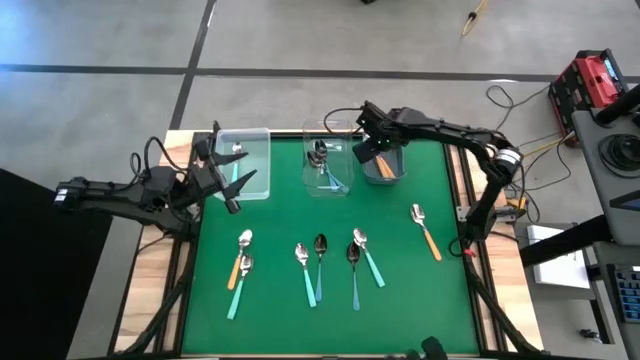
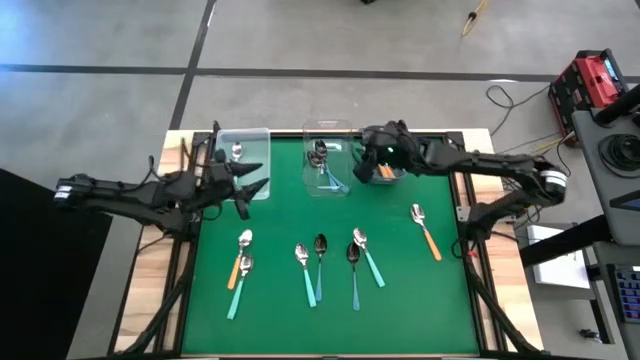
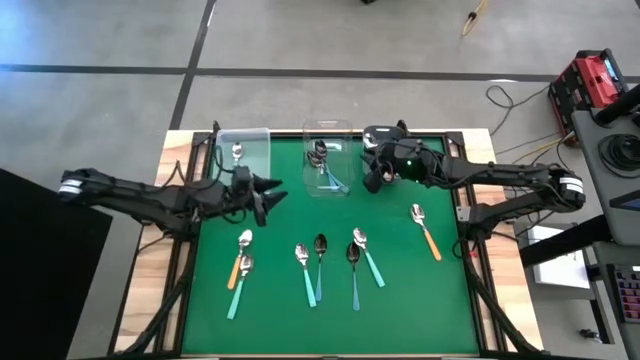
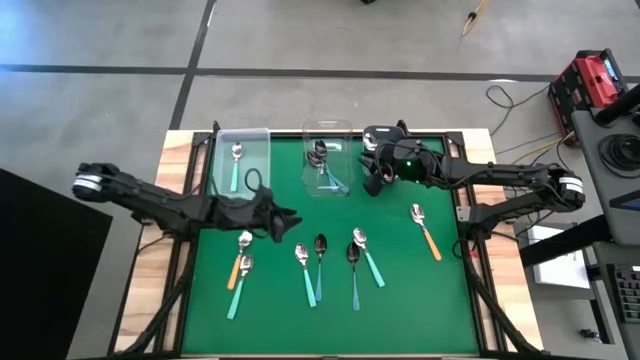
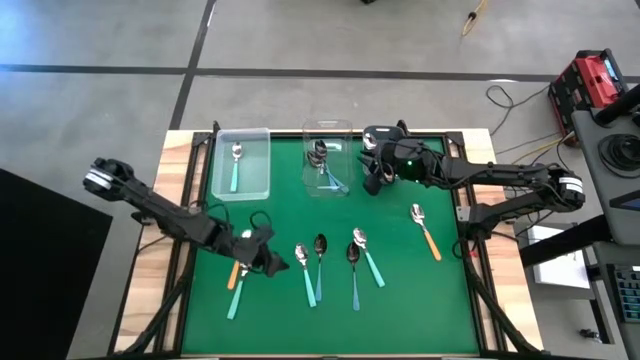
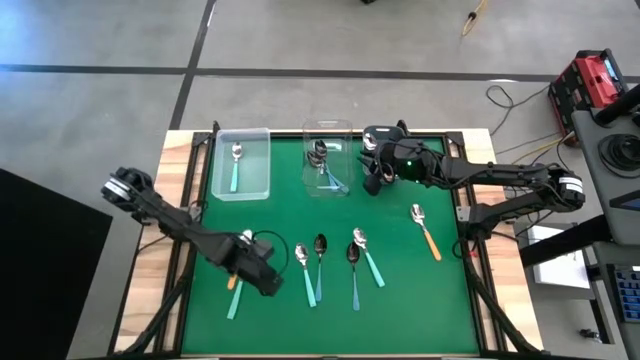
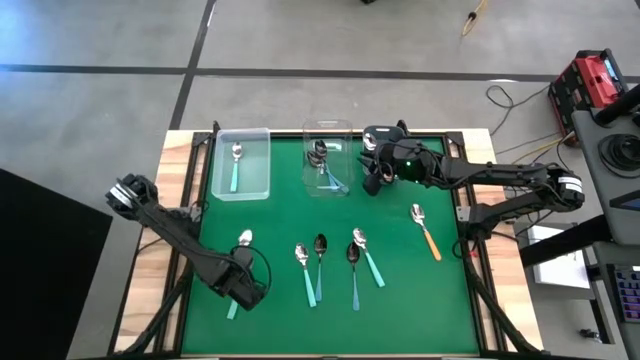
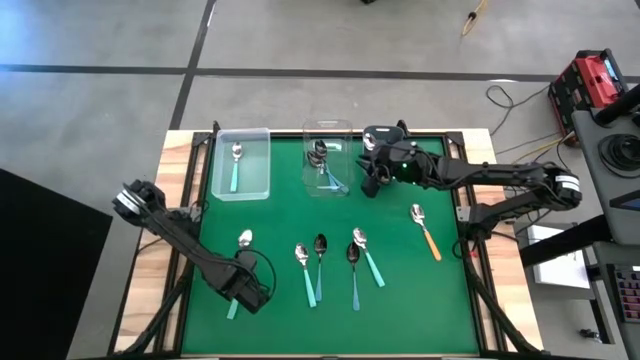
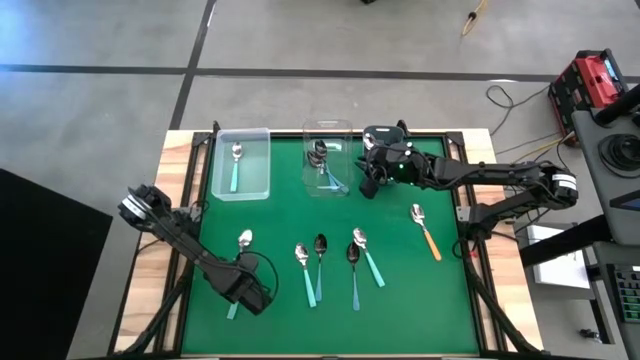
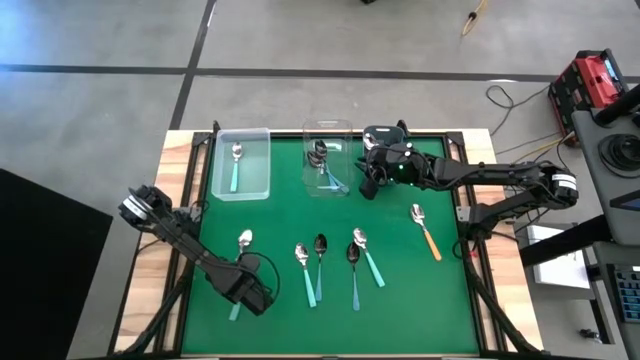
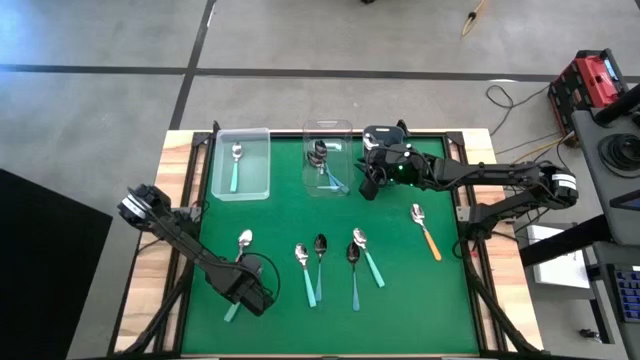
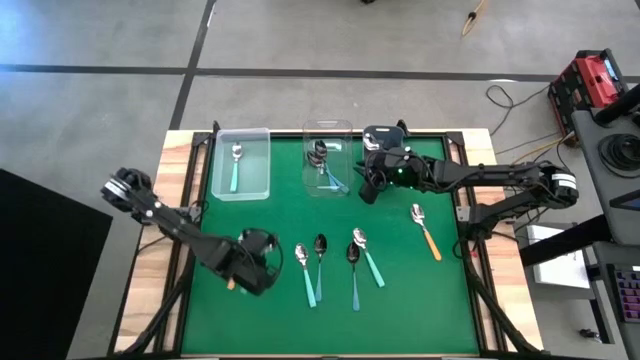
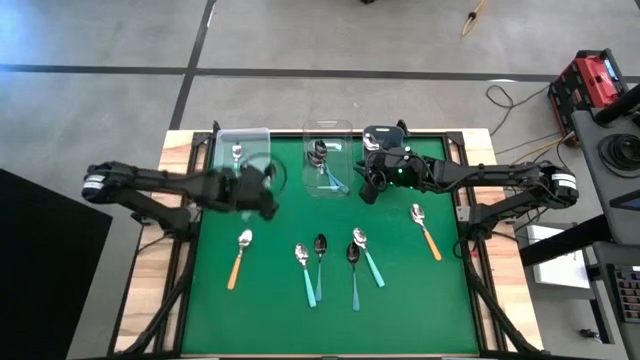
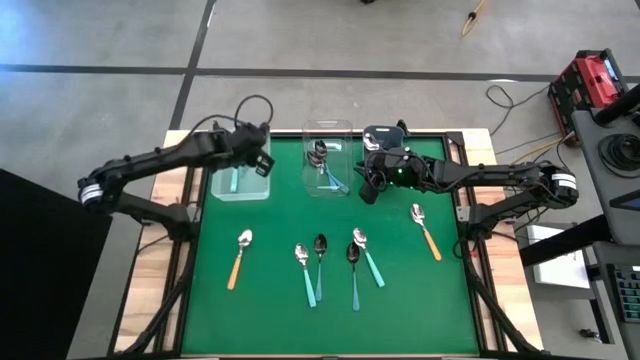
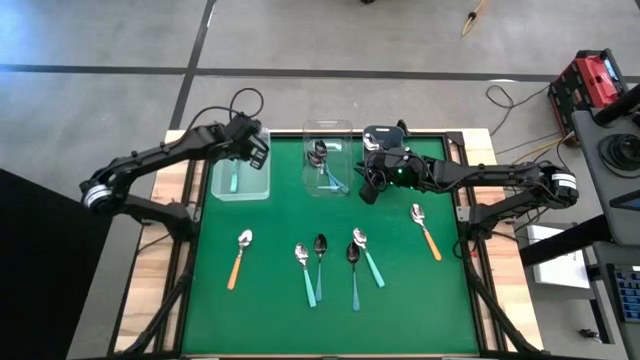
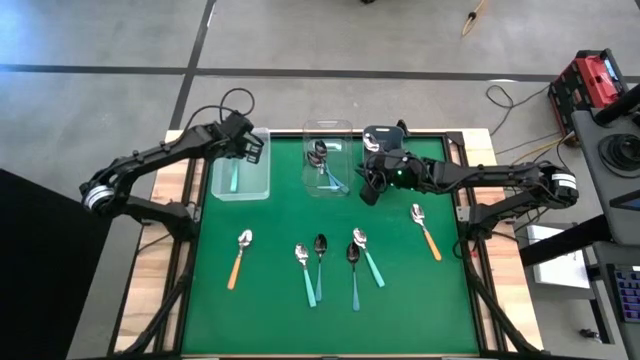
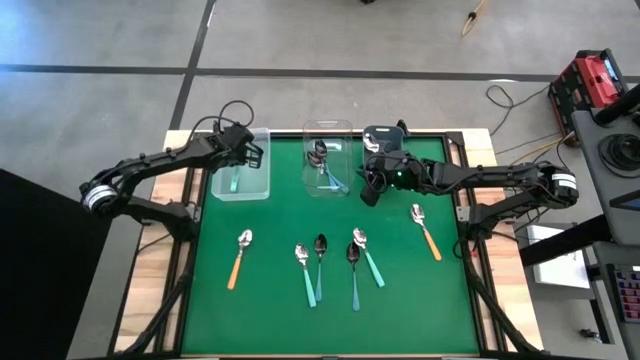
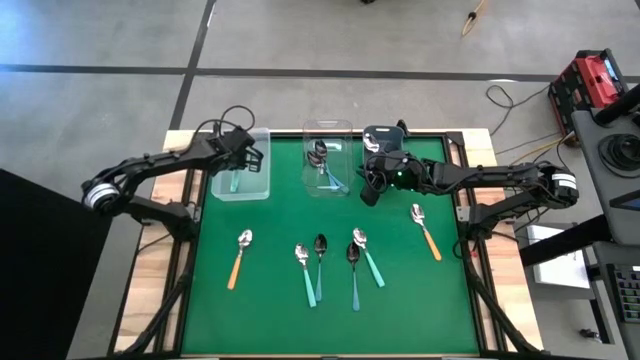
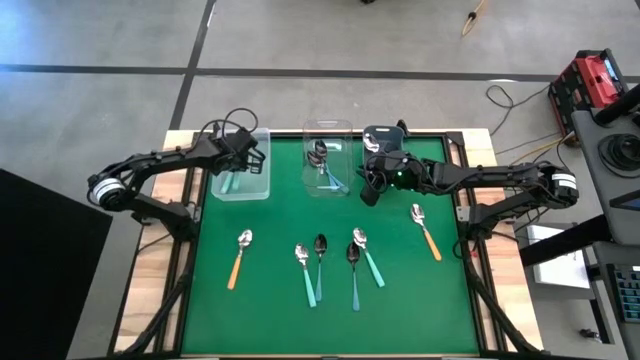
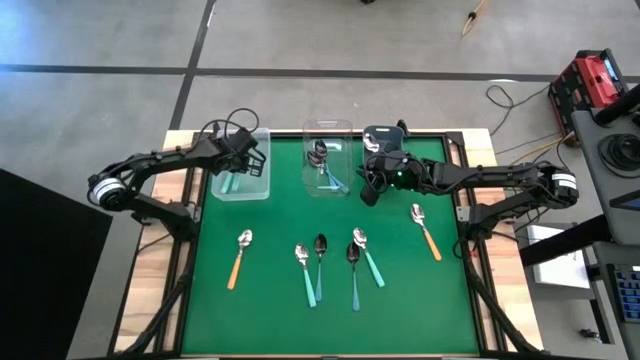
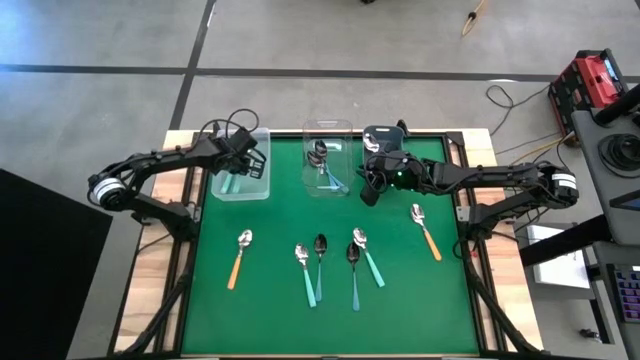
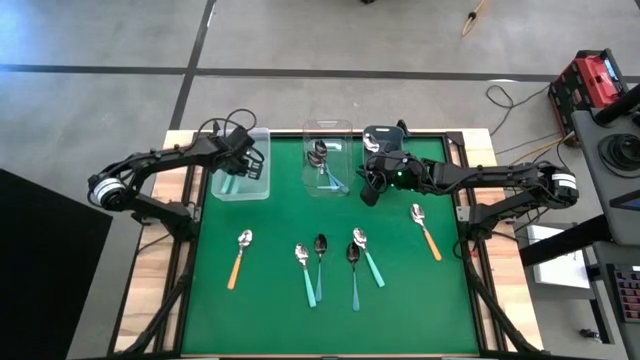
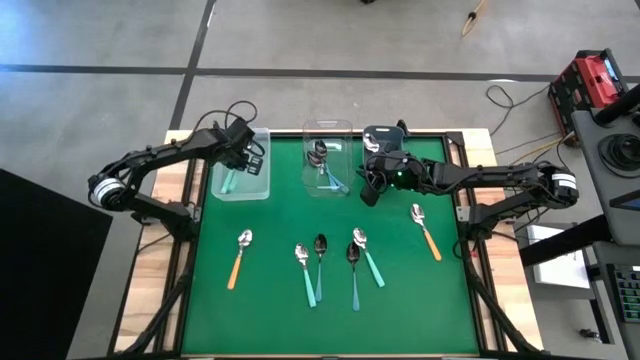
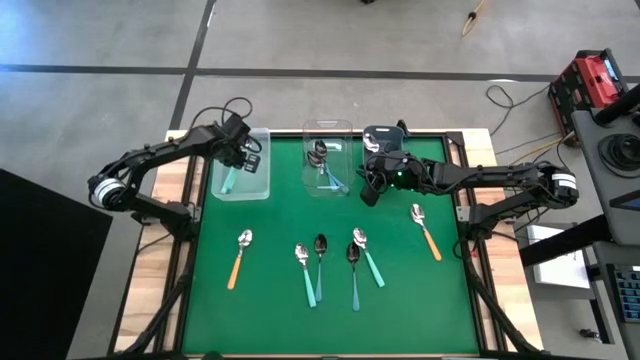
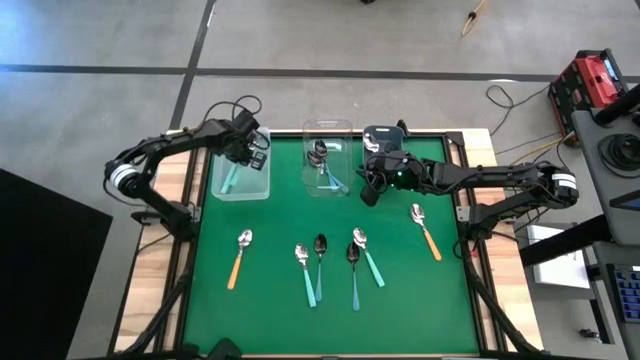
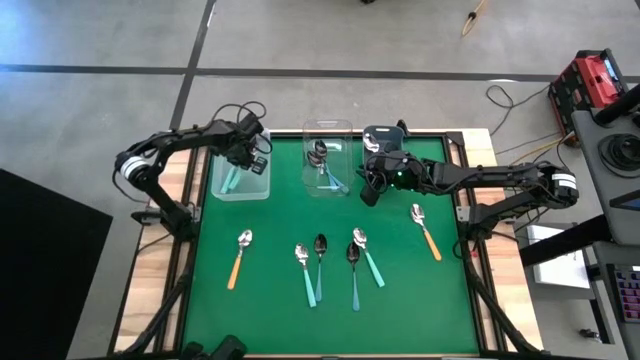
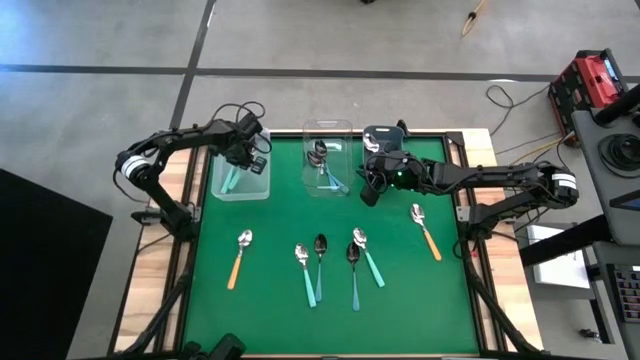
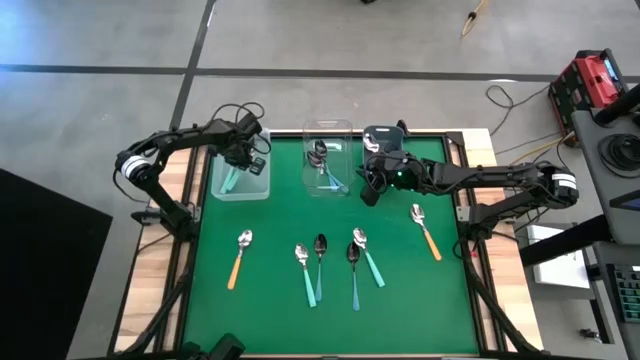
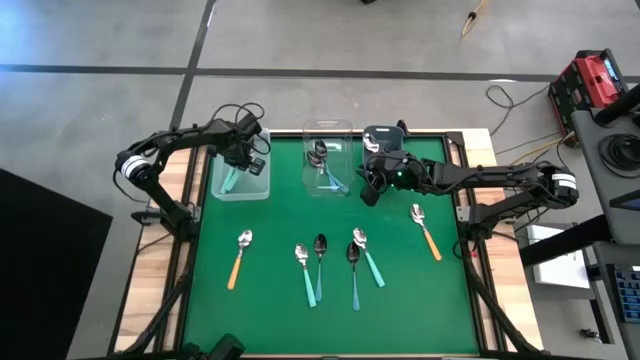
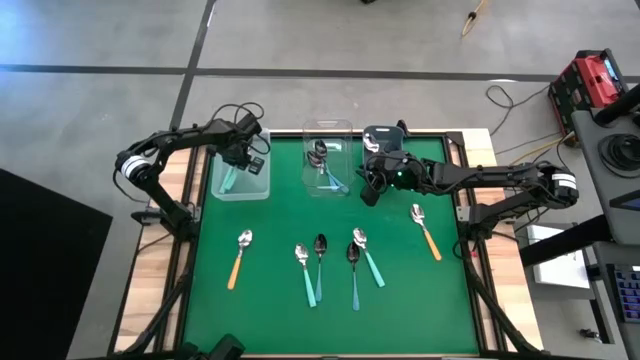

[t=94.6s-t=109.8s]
Task: Sort silverware by color (type)
Put the green spoon into the white bin

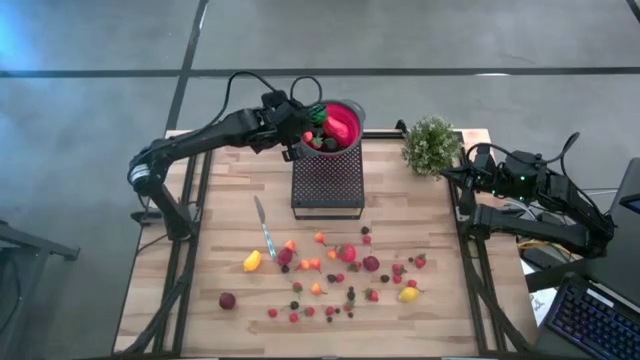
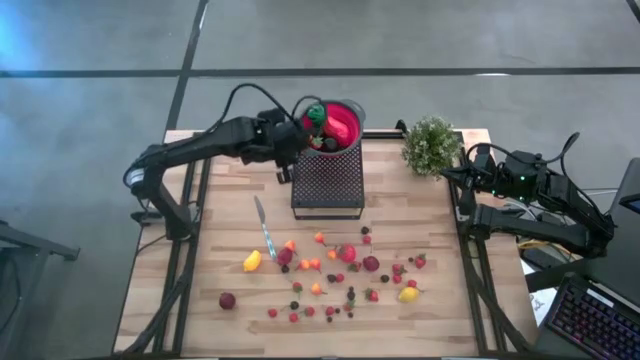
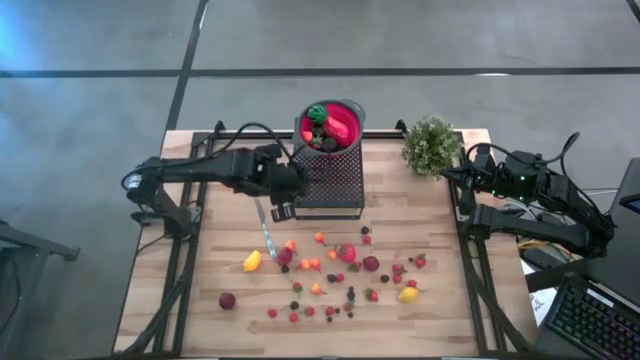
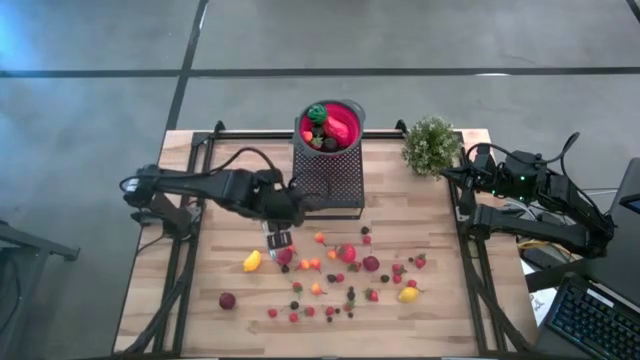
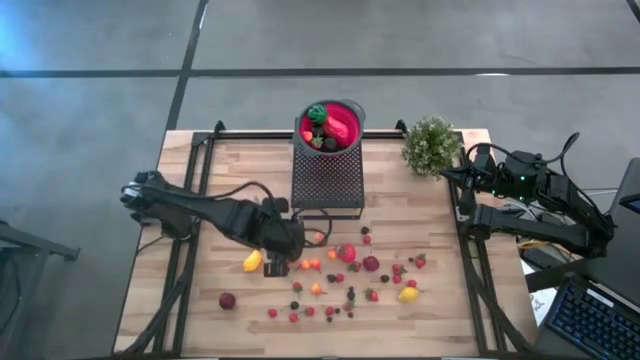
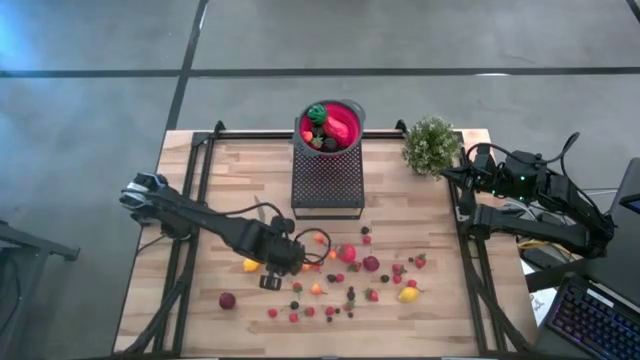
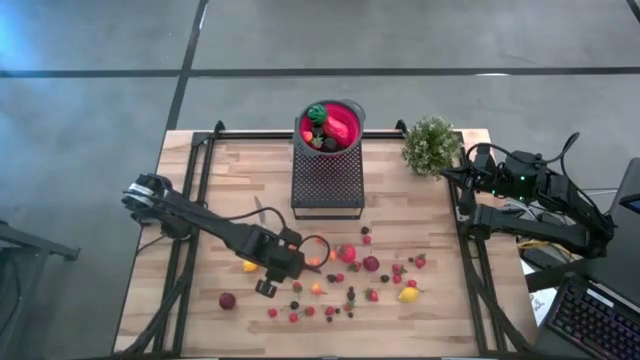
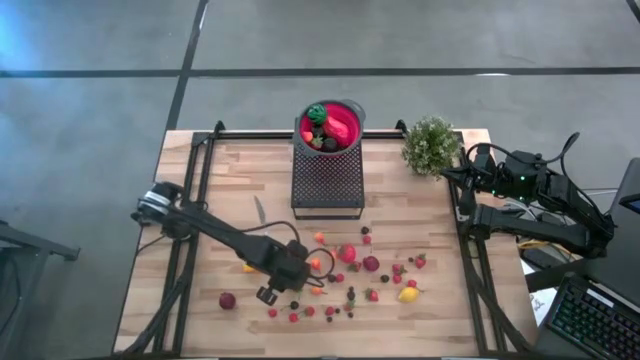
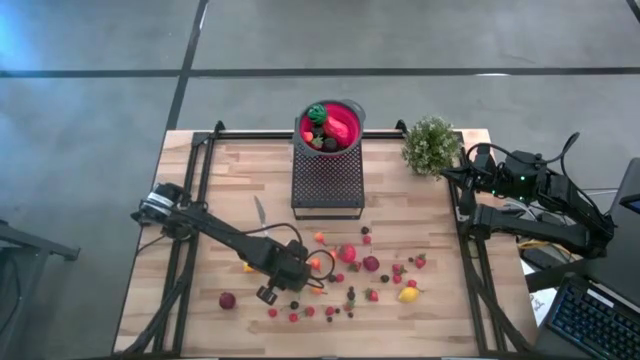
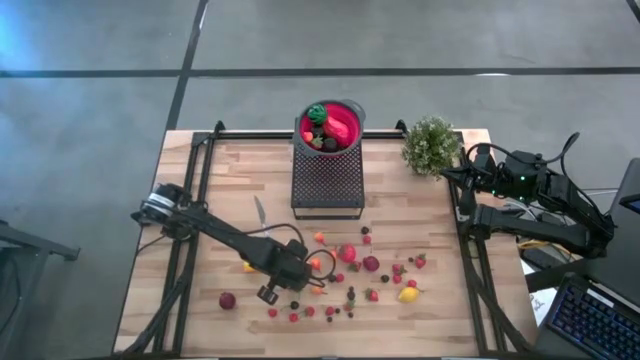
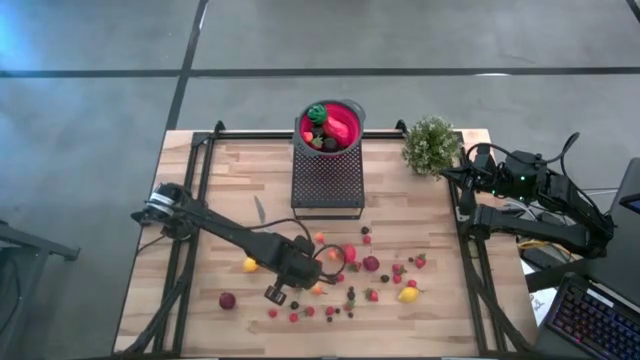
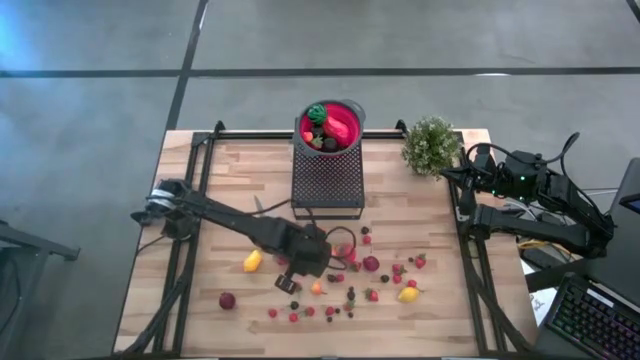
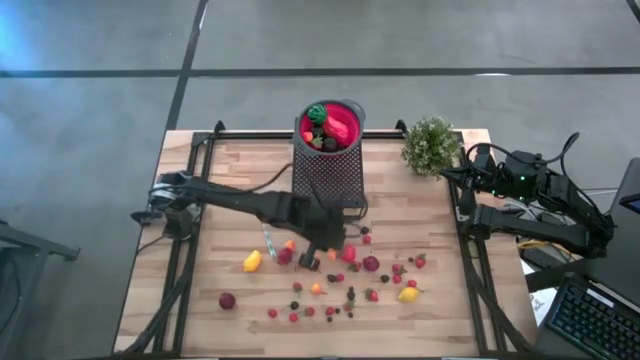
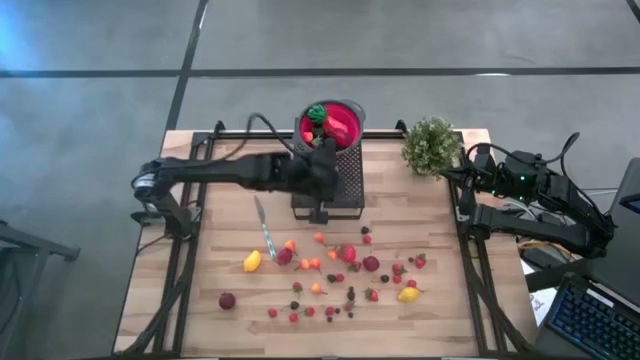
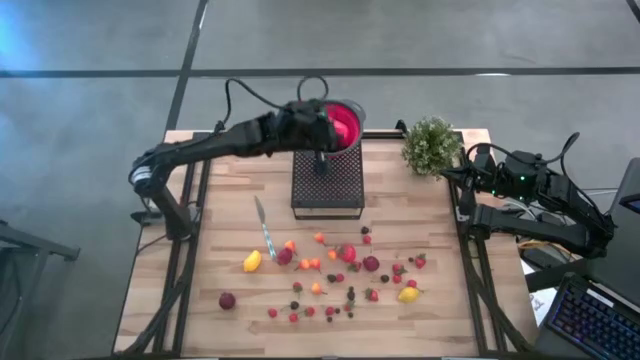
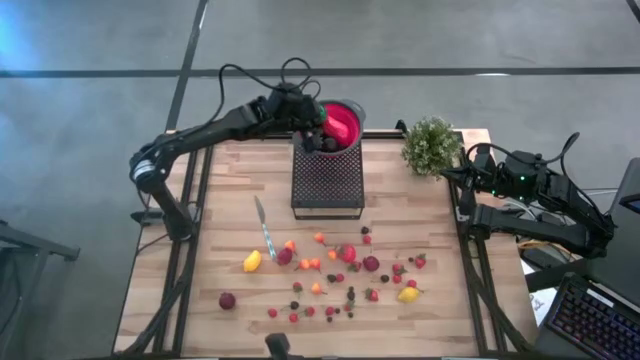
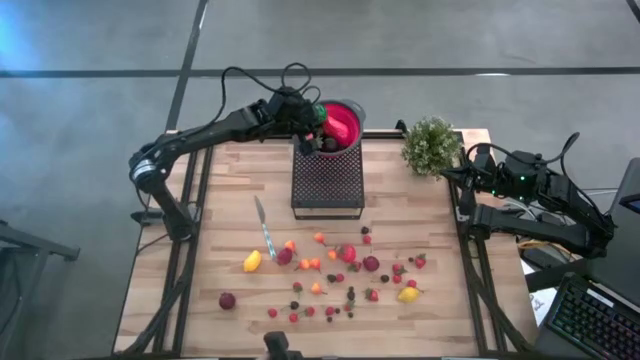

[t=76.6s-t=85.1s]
Task: Pick & Place Fruit
Put the black cherry into the strainer bowl on the shelf
